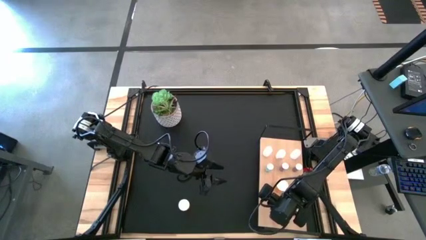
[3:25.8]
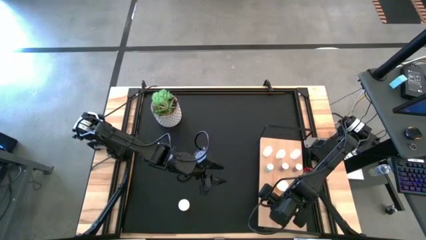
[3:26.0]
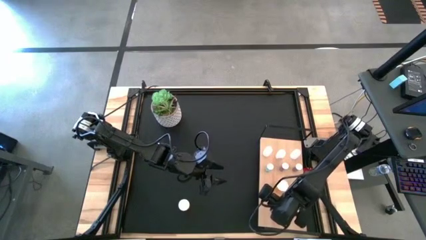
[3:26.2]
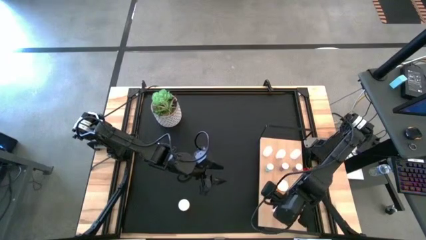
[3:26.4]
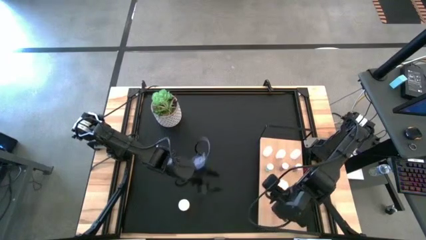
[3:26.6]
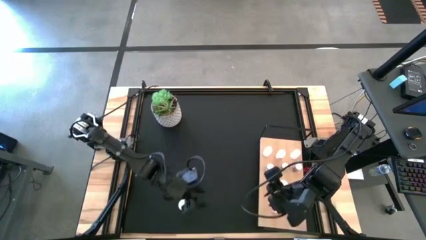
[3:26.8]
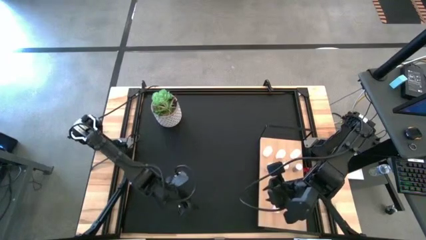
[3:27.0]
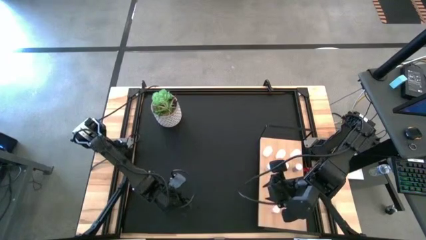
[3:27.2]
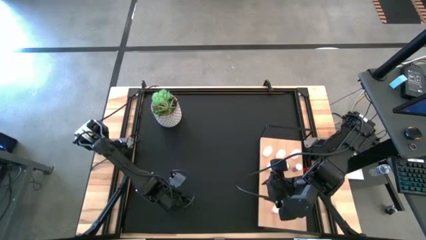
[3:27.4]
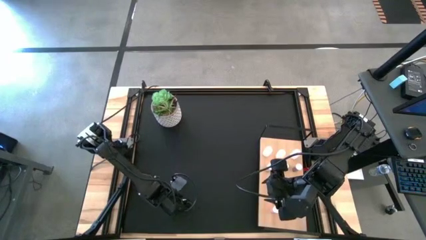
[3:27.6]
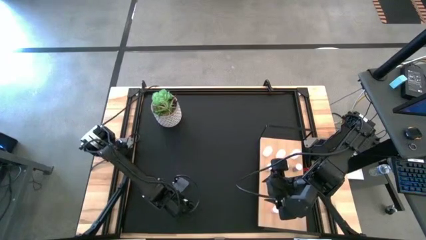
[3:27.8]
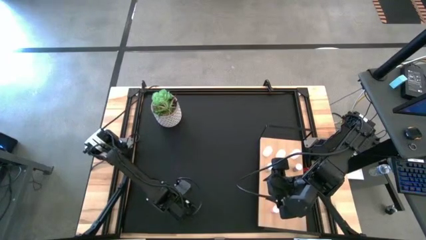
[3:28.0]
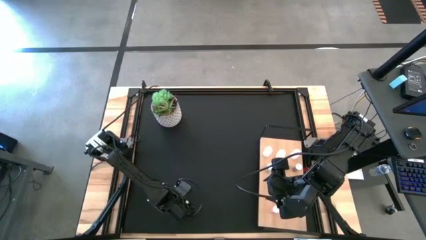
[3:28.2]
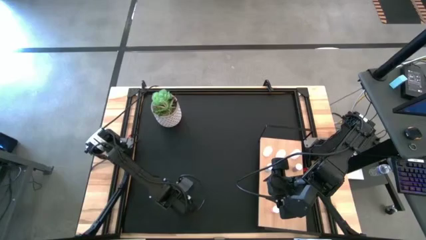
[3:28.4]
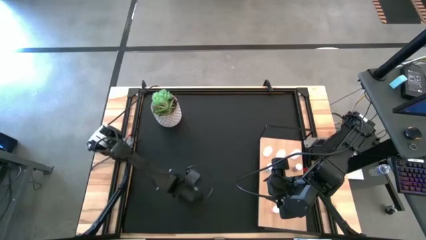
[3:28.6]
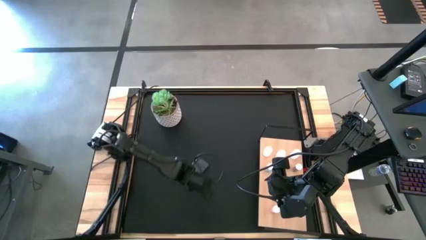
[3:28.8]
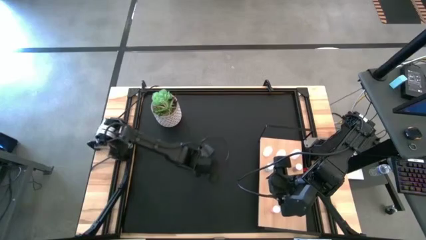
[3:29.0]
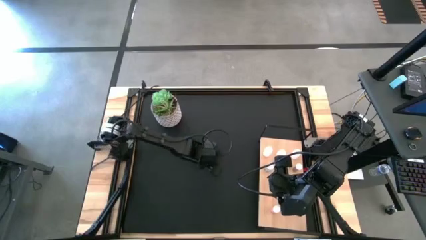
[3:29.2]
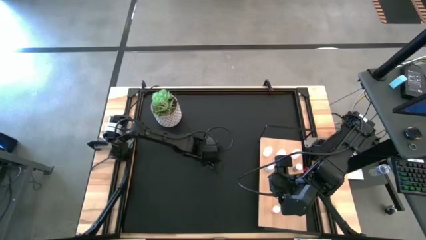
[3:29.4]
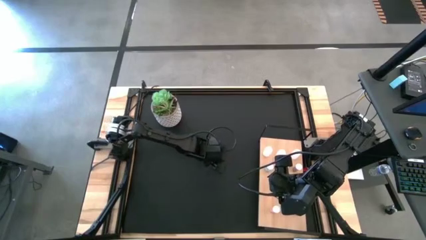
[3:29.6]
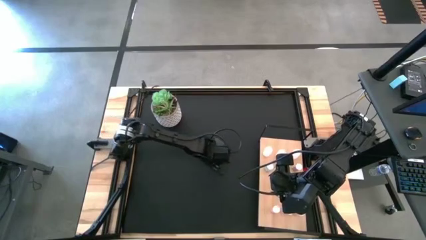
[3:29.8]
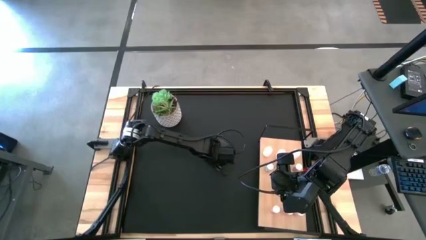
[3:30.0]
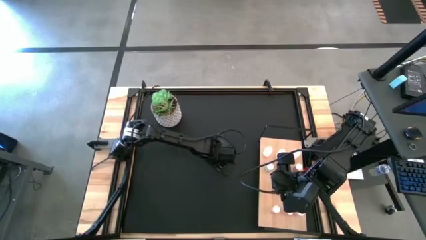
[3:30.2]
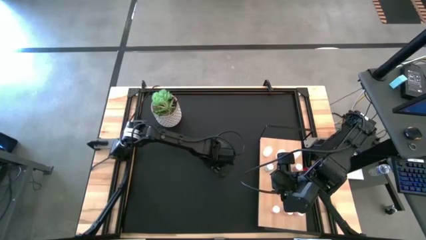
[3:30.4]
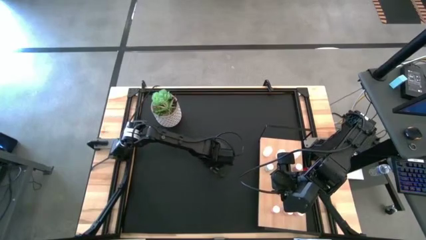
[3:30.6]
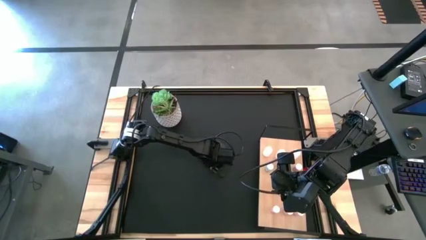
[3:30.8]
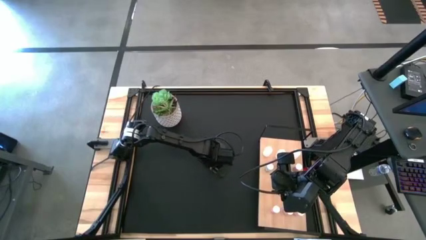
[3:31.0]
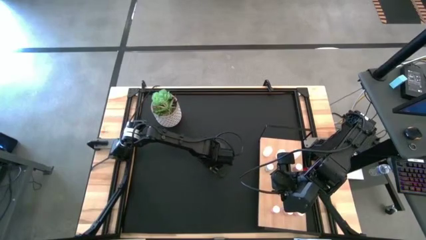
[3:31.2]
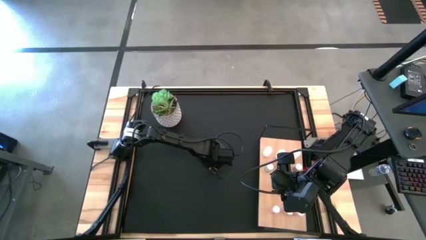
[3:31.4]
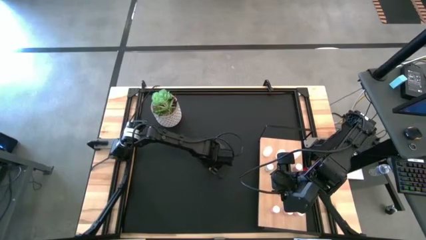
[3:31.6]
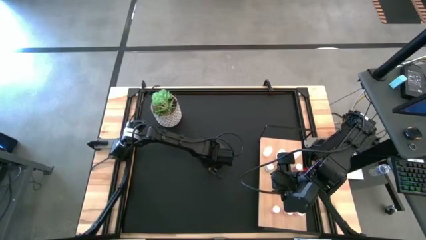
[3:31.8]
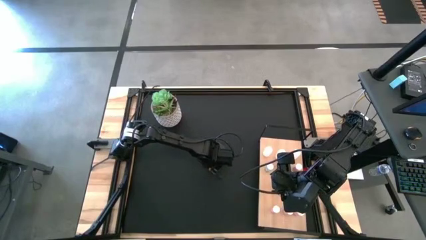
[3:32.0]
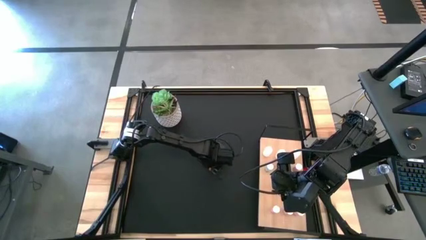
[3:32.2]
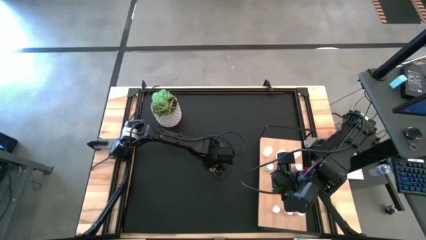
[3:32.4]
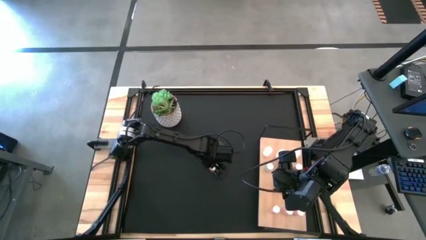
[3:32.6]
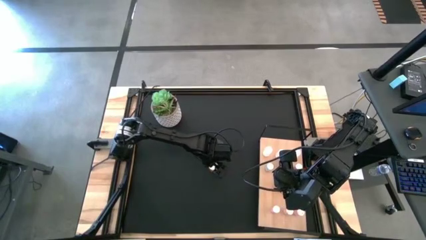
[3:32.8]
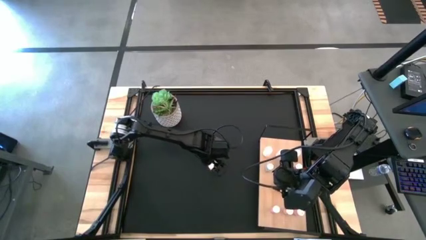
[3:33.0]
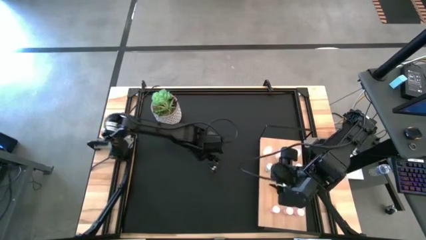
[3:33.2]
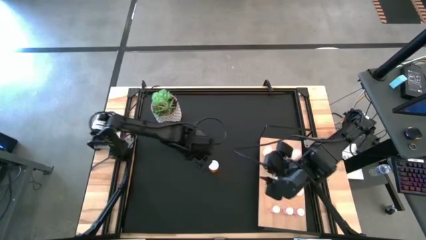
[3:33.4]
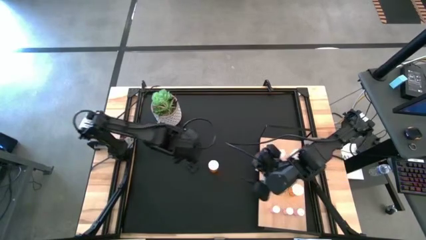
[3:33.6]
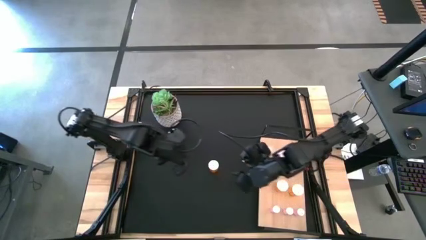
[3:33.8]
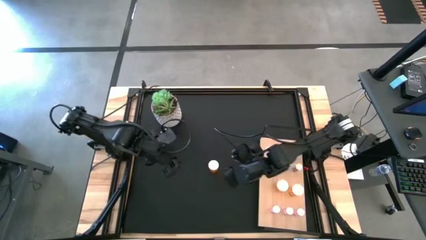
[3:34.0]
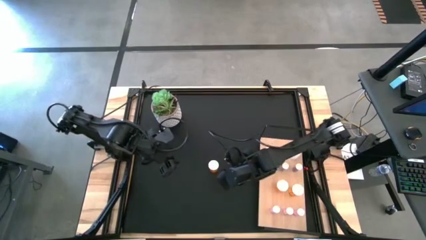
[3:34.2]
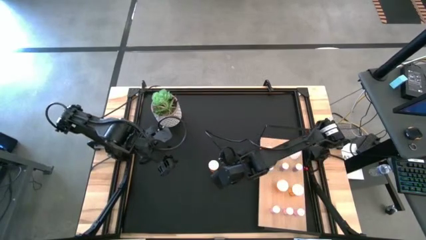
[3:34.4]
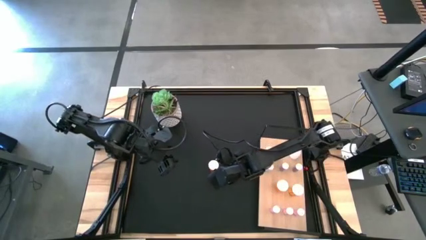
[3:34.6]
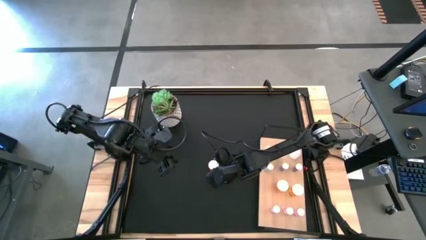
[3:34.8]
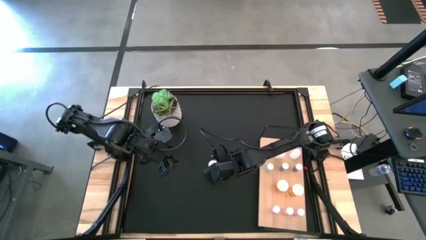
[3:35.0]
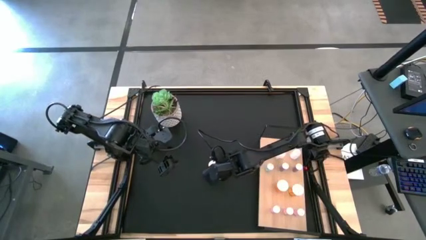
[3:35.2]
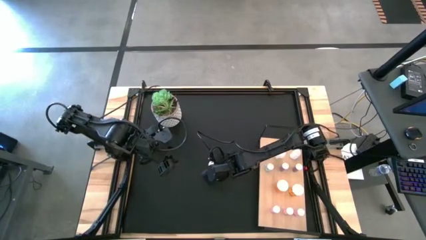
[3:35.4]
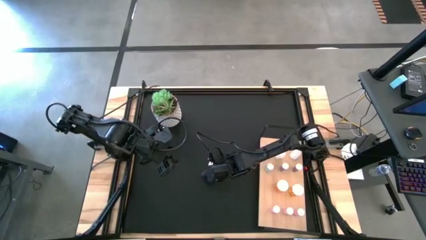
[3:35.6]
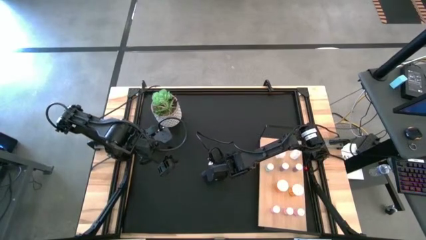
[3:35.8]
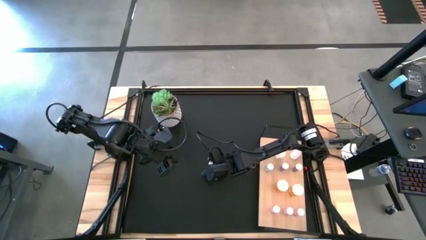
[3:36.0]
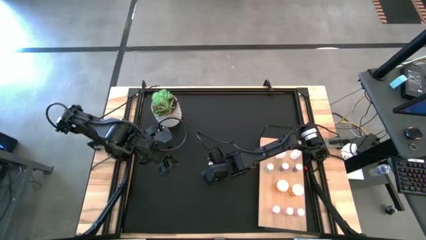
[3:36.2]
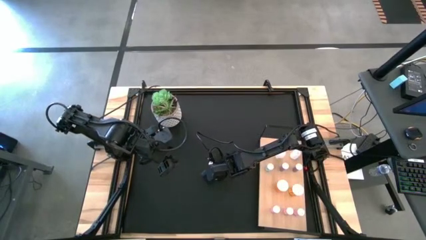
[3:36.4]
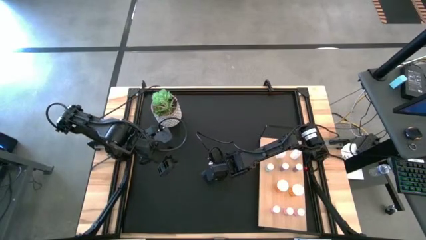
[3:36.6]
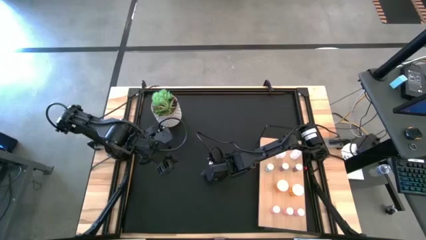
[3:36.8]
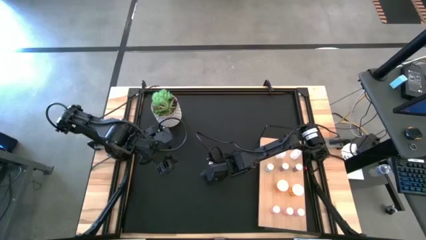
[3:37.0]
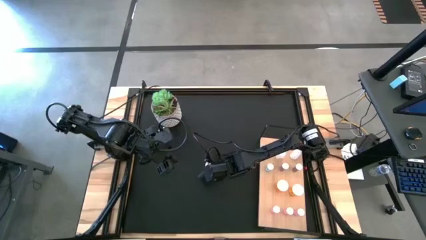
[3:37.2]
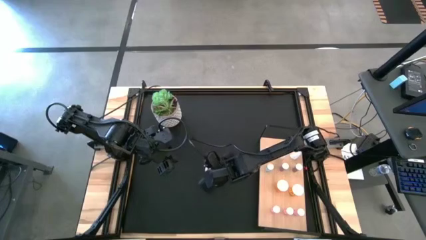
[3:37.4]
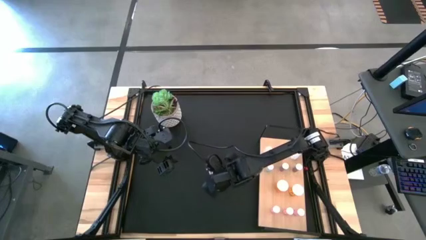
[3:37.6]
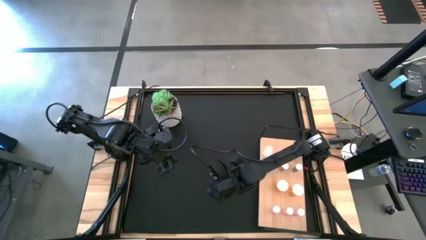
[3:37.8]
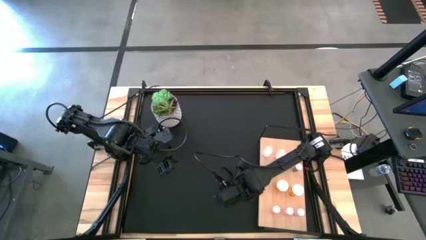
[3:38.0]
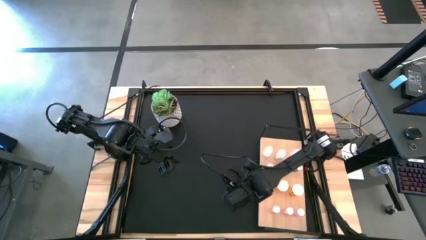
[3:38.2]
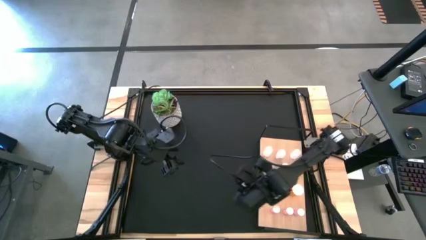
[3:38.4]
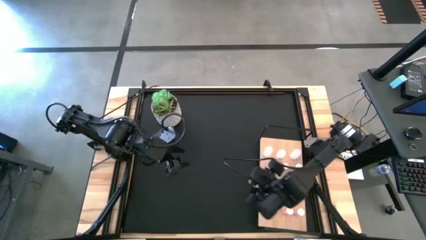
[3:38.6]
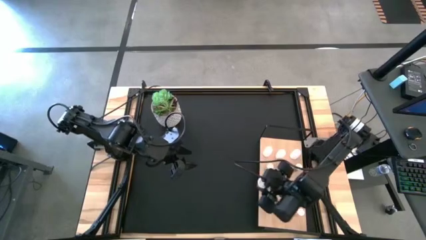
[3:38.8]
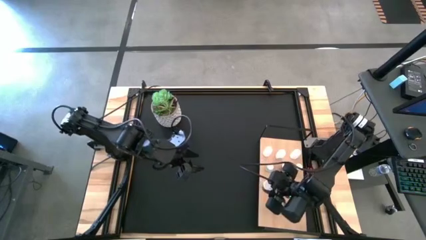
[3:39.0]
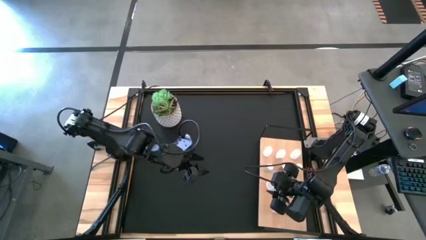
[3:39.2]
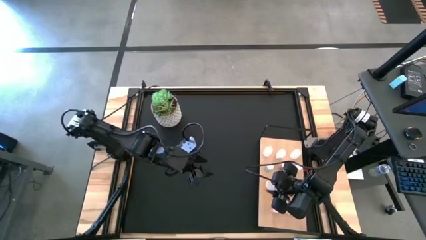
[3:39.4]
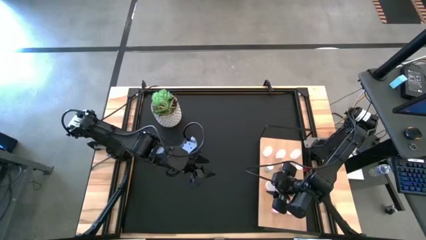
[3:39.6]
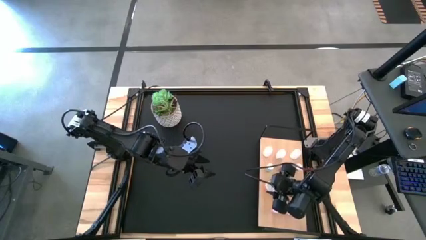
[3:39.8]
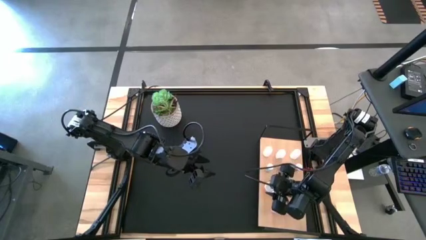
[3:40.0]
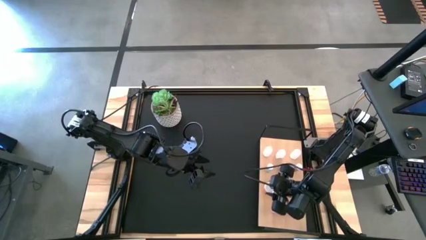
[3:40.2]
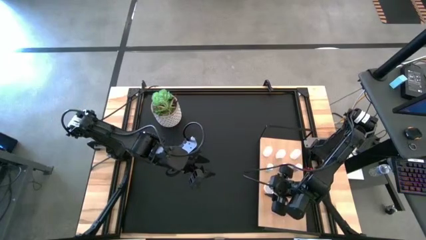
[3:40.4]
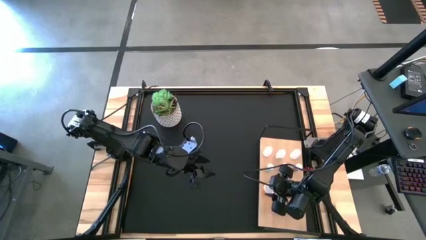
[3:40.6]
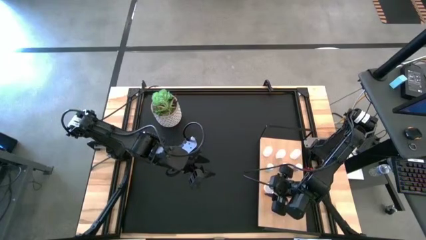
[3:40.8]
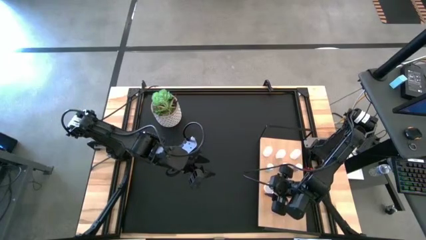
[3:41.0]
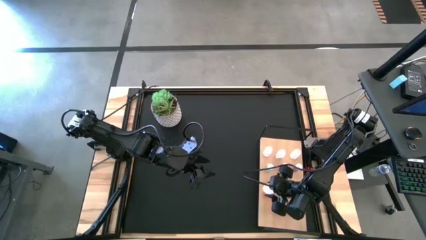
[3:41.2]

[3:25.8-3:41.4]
Task: Pick and place medicine bottles onto shelf by color
Put the orange pill bottle on the shelf aligned with the other pill capsule bottles

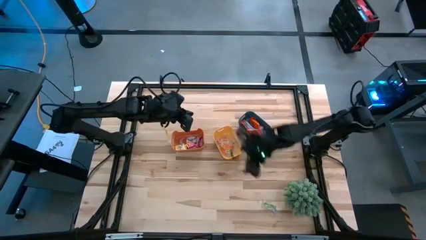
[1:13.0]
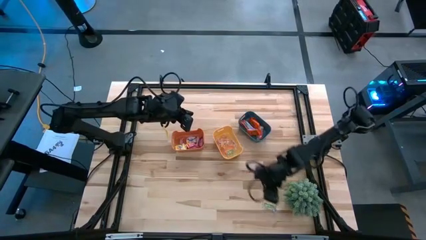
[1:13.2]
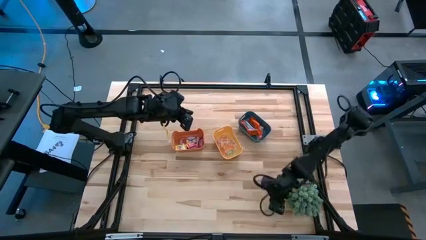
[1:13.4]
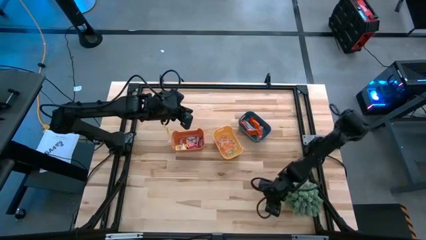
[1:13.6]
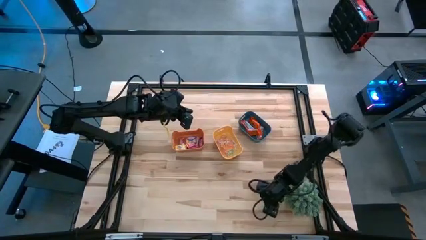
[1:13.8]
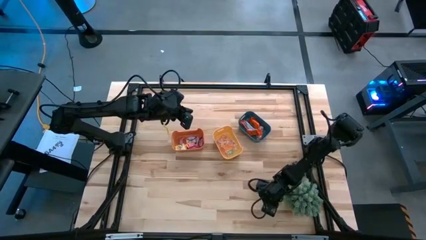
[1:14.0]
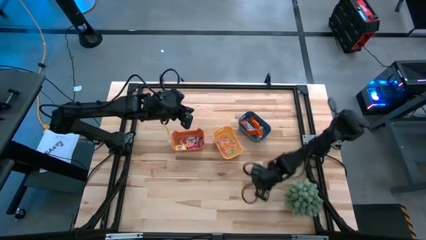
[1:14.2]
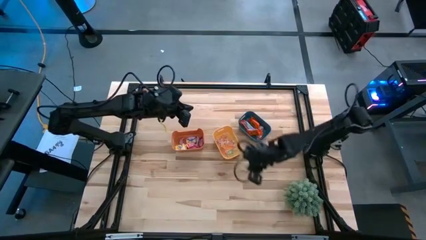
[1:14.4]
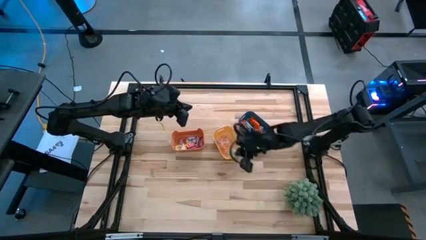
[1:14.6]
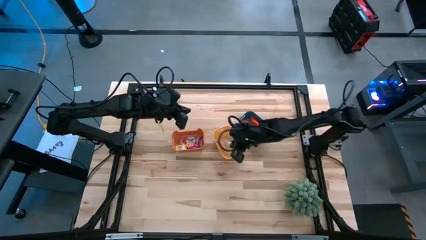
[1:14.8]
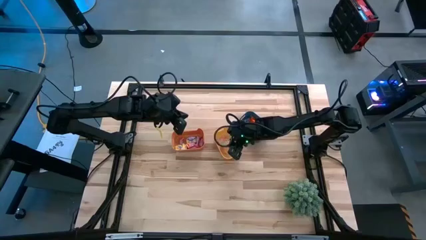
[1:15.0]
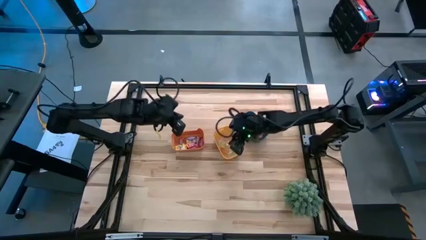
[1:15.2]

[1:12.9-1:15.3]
Task: Sort candy
Put the green gummy into the yellow bin
